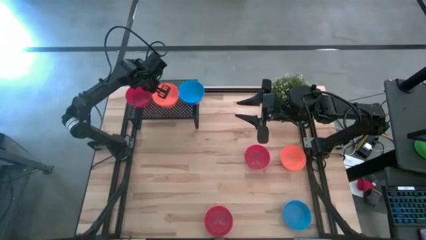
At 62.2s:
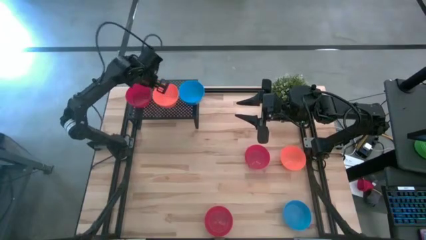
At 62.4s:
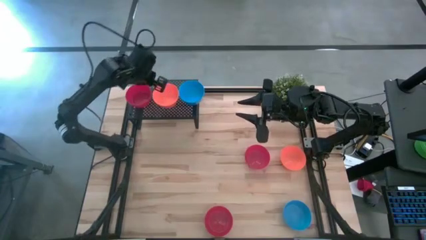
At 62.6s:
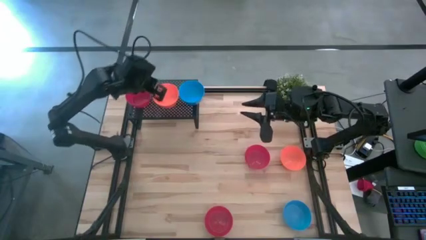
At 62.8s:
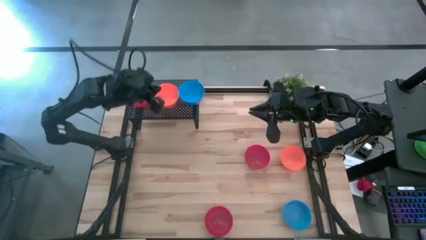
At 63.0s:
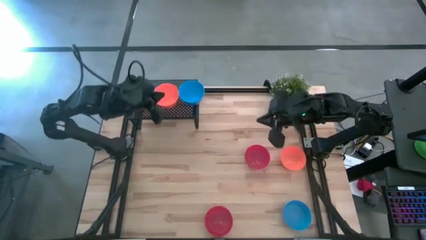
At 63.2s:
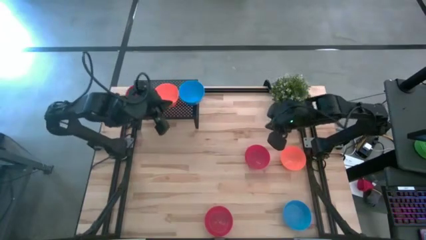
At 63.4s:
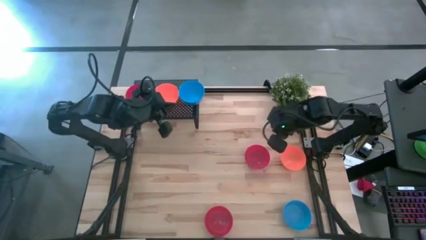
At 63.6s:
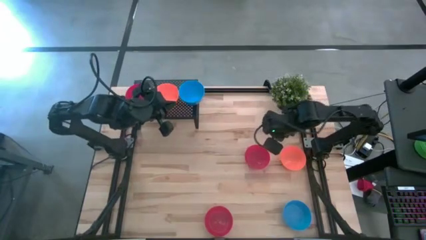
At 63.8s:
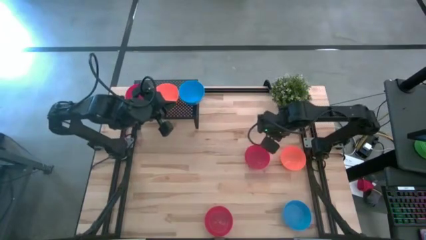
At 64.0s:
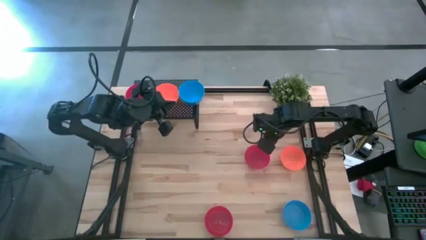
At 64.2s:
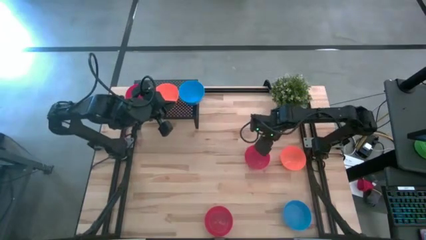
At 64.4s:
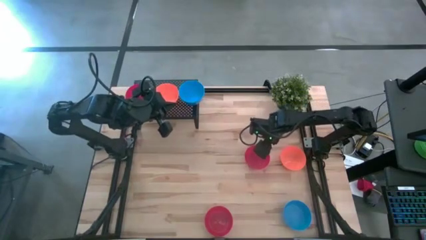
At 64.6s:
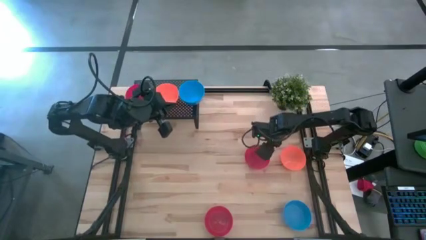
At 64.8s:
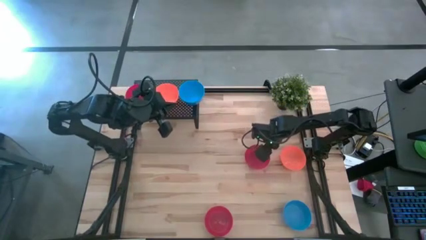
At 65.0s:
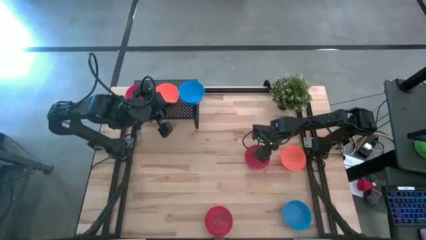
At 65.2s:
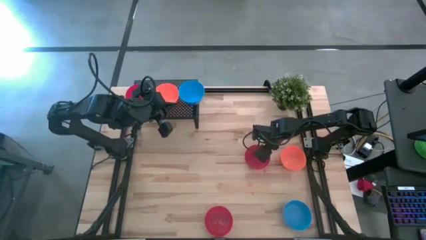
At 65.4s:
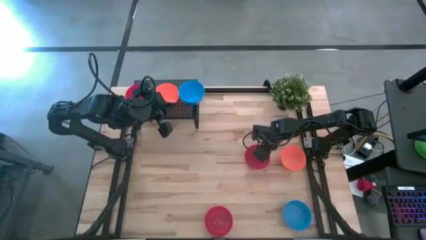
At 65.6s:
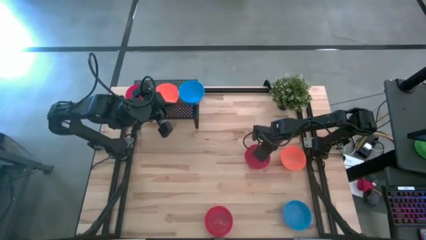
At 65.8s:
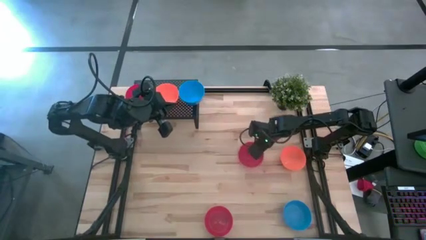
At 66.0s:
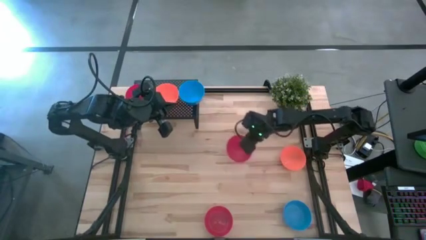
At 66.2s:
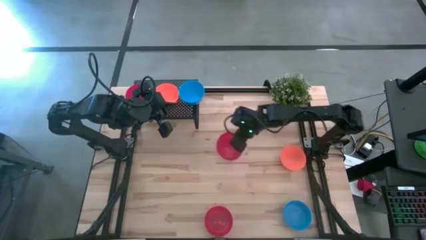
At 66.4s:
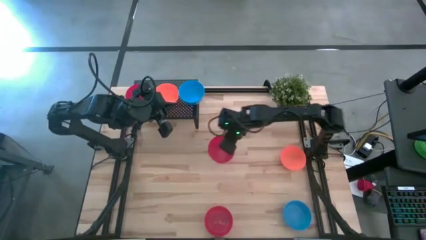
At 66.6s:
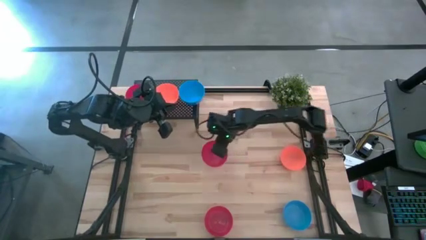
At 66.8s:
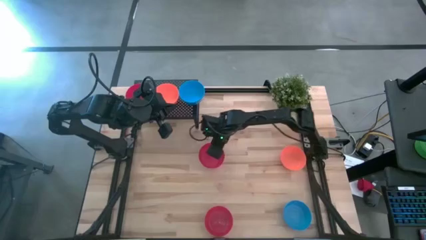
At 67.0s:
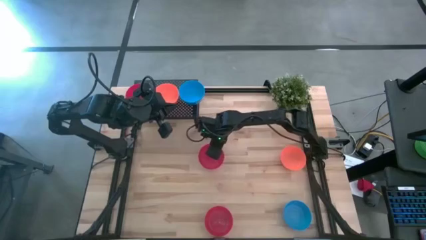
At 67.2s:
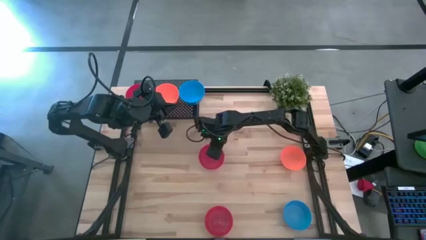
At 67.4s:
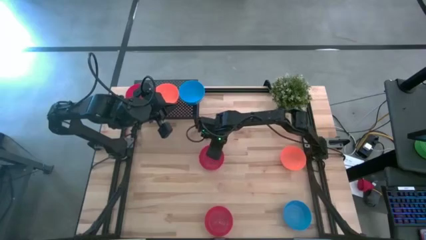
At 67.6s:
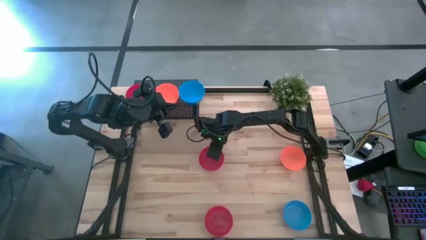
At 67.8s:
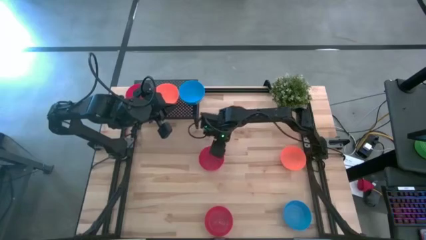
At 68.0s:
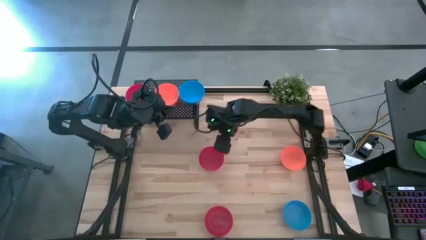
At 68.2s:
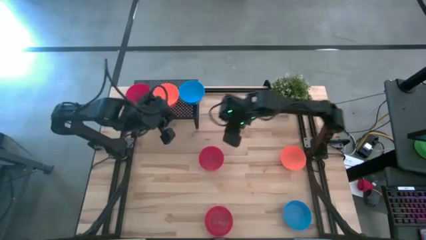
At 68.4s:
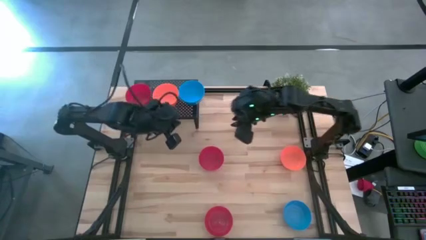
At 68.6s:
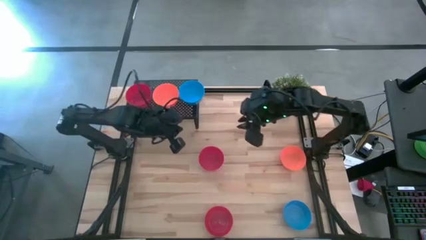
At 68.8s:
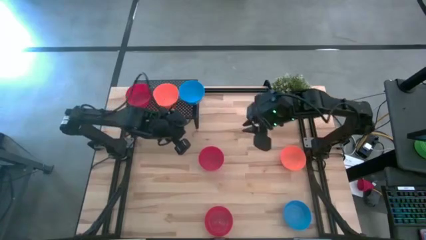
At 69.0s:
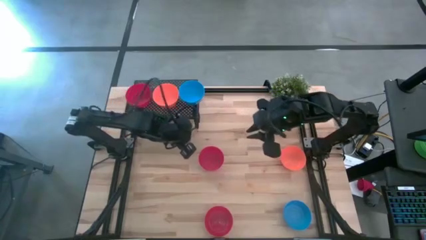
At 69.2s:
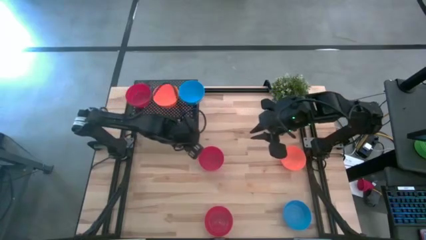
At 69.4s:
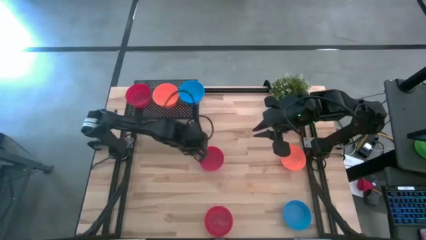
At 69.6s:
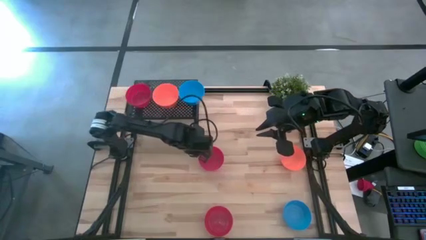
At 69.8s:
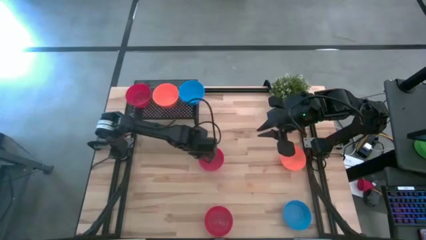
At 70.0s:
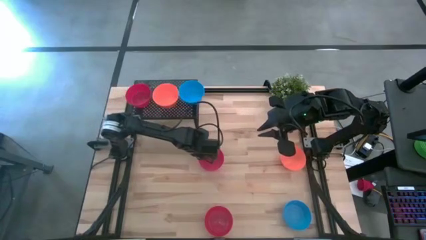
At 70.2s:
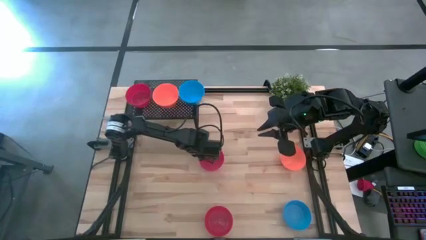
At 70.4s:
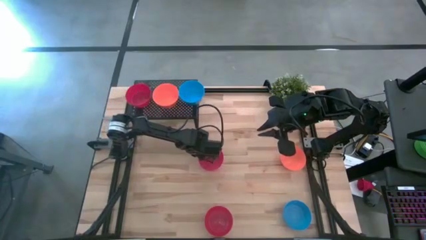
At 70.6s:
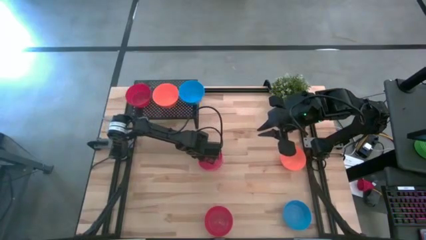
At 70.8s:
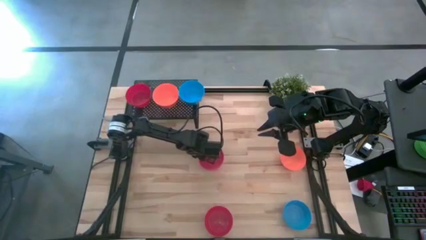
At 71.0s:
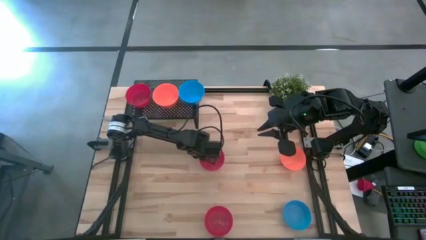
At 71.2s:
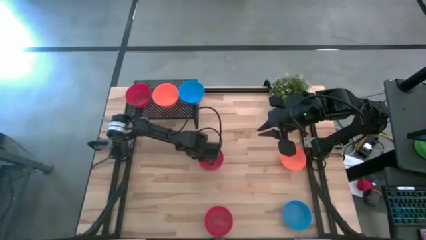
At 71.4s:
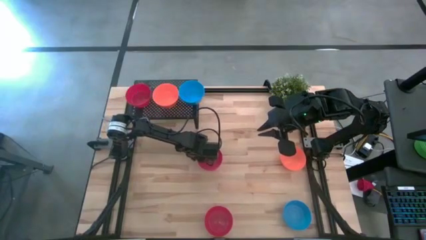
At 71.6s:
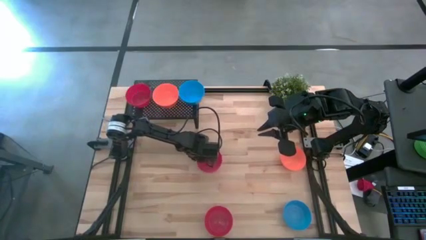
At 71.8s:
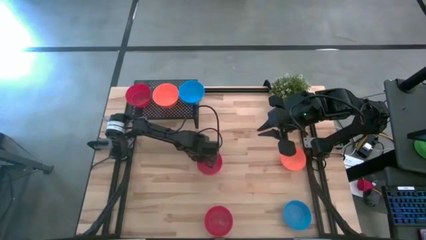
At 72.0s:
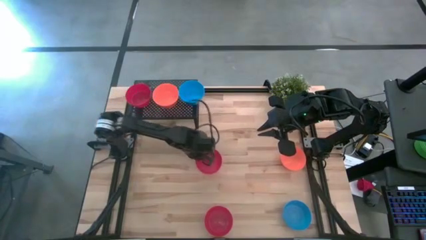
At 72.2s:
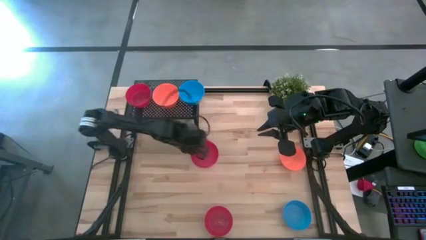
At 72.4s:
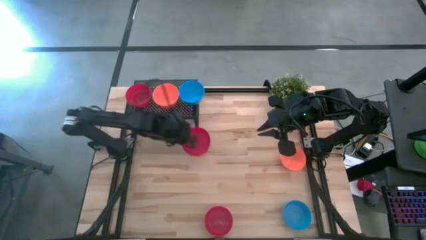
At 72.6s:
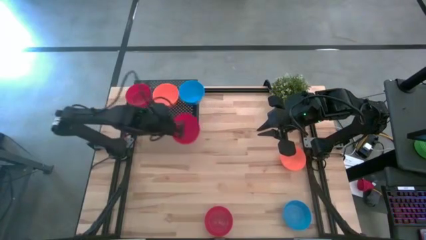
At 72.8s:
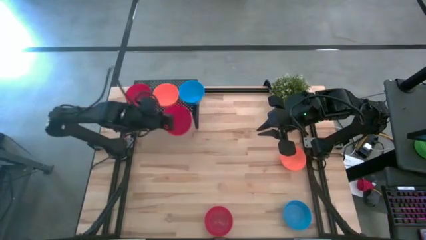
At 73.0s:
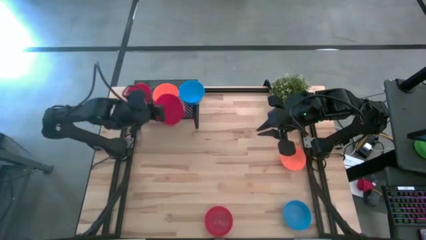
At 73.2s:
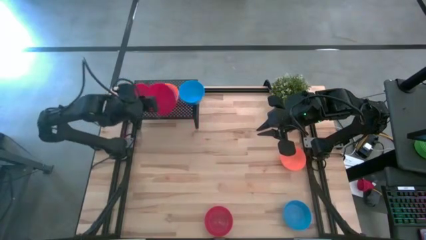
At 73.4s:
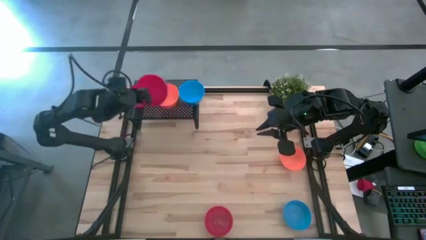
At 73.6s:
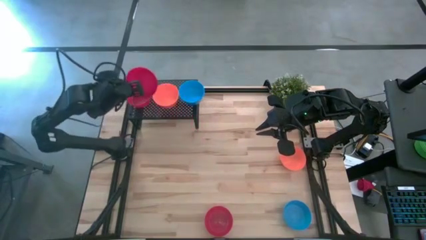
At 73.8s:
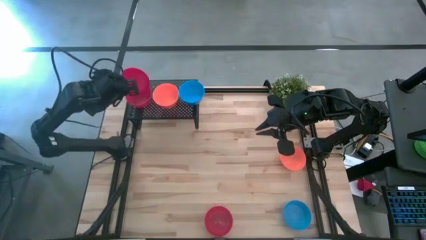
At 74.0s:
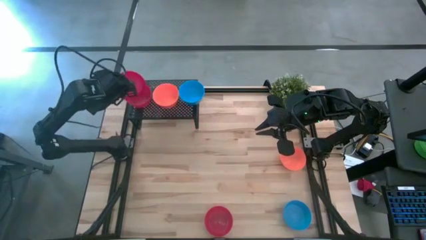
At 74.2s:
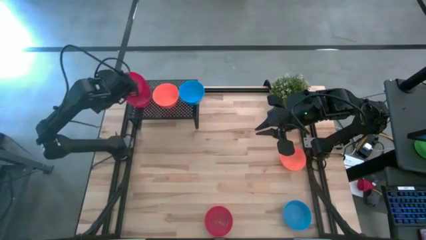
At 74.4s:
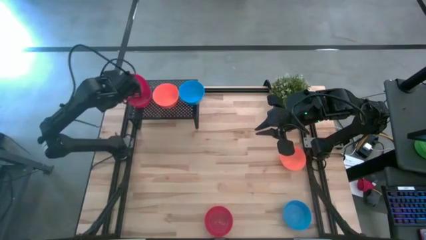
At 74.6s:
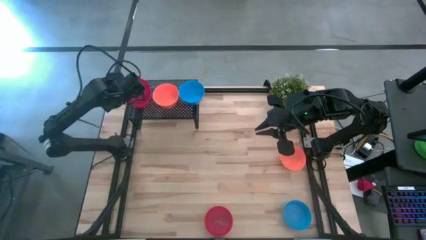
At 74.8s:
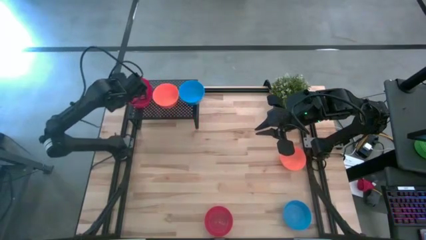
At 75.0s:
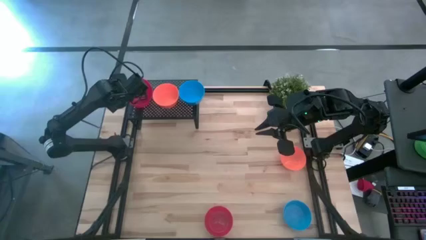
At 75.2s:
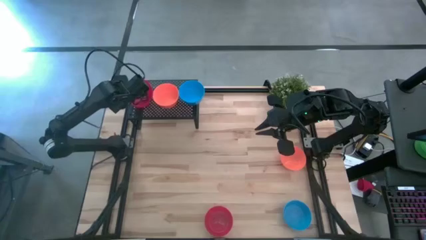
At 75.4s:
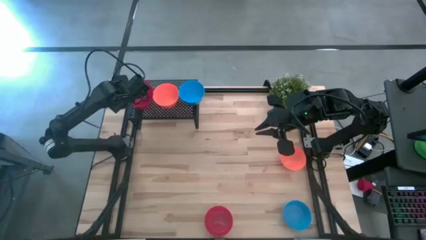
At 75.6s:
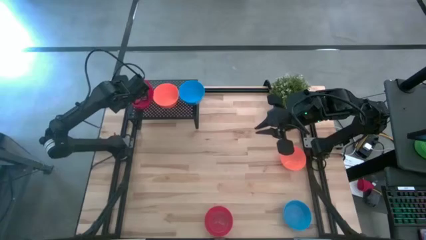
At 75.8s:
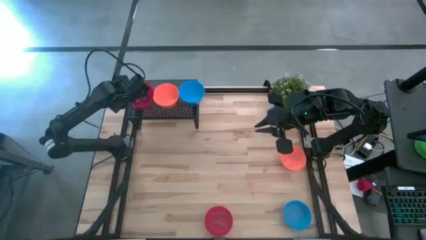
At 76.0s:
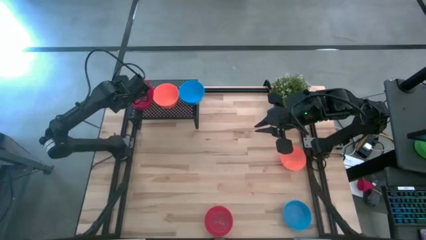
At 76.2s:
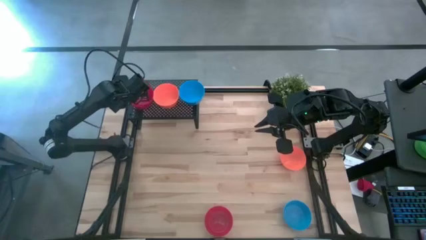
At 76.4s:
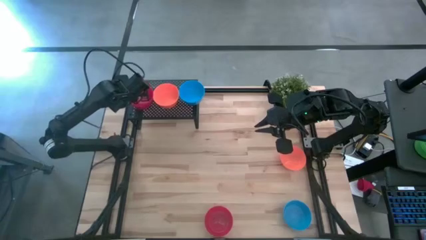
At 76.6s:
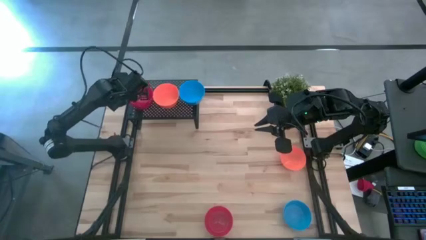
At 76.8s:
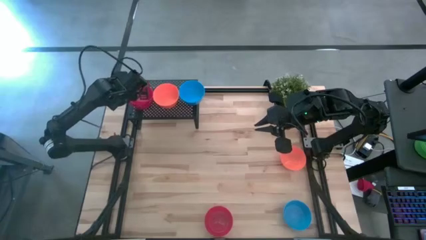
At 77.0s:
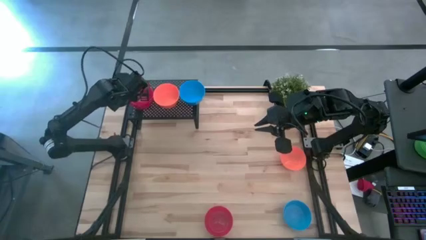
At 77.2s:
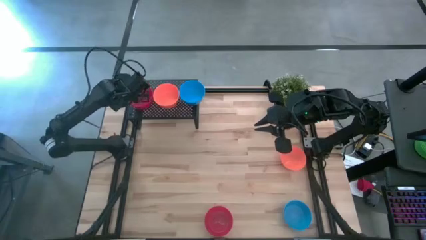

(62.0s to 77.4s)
Task: Pick & Place Mini bowls
Stack the top red bowl on top of the red bowl on the shelf

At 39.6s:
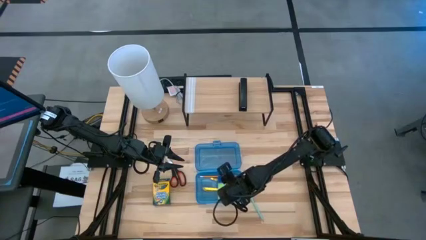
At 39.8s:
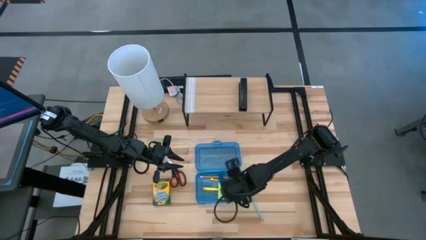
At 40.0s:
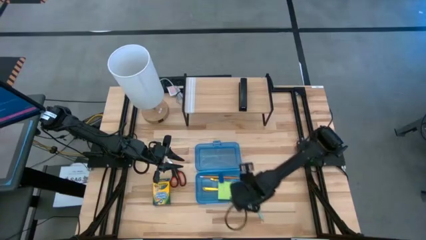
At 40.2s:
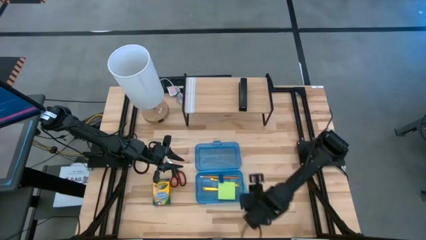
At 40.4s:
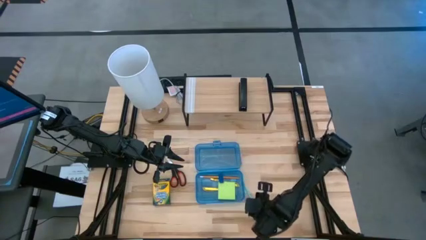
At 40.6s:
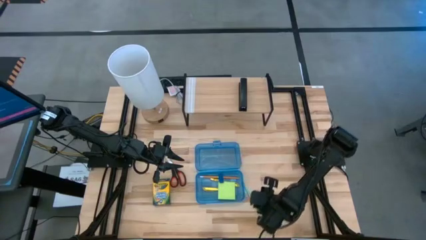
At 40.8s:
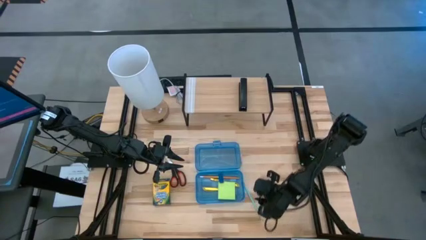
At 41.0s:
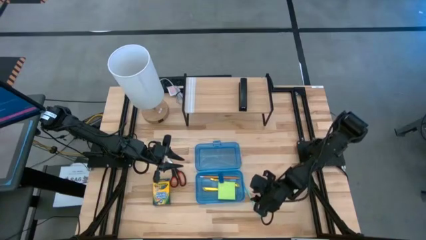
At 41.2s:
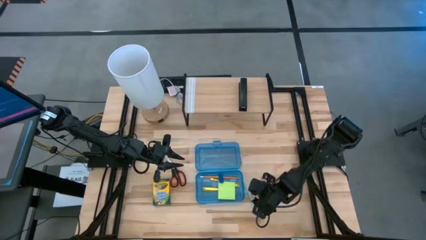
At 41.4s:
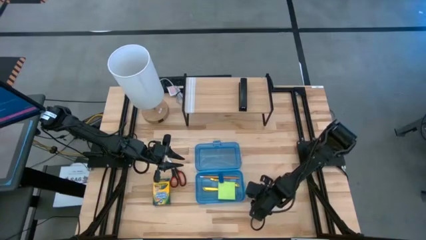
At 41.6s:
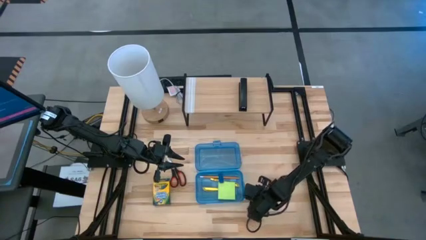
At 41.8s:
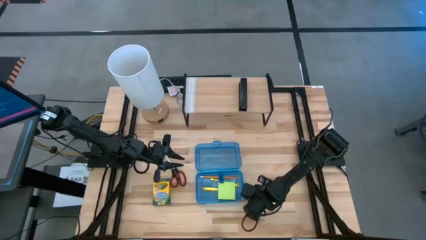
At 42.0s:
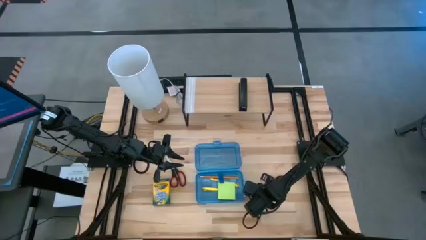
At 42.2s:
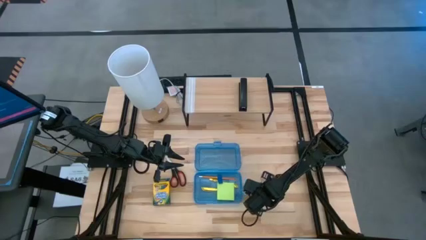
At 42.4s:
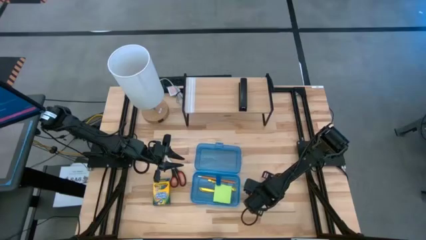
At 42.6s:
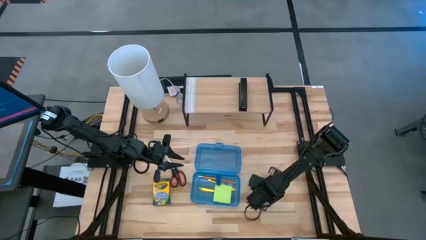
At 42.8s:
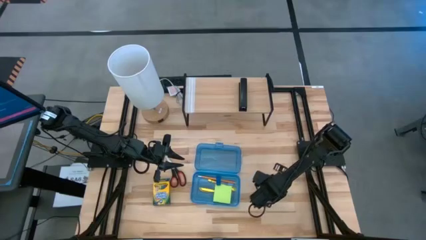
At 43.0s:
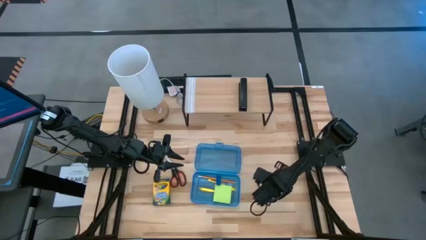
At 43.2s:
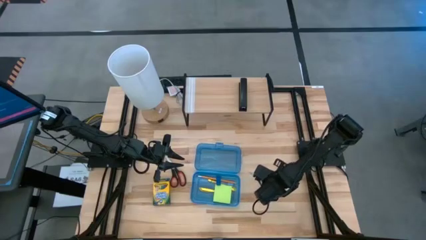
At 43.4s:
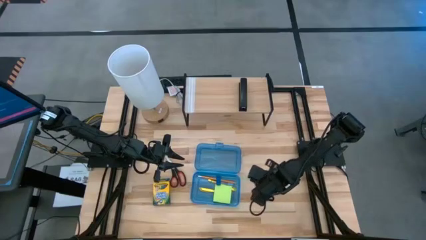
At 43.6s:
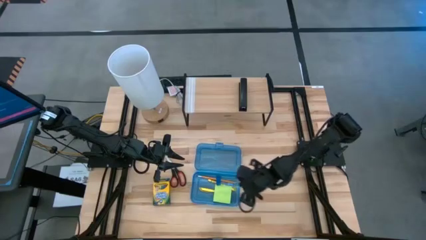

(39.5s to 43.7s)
Task: Pack school essentials
Put the blue pencil into the blue supply box
